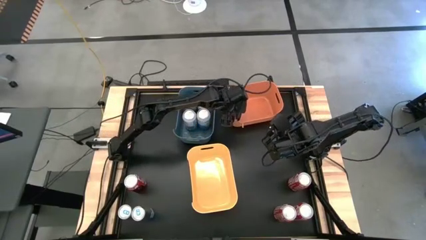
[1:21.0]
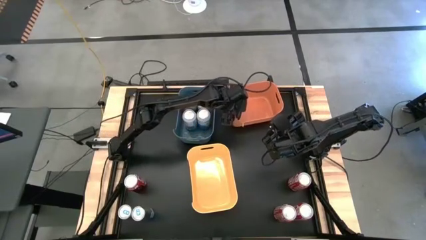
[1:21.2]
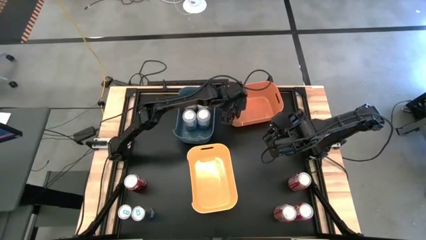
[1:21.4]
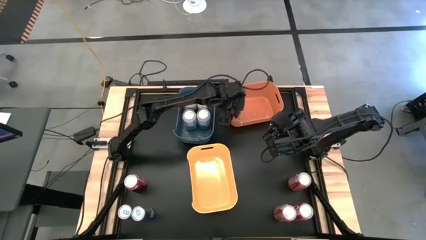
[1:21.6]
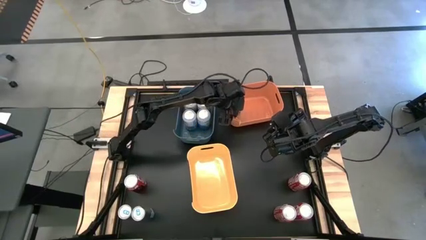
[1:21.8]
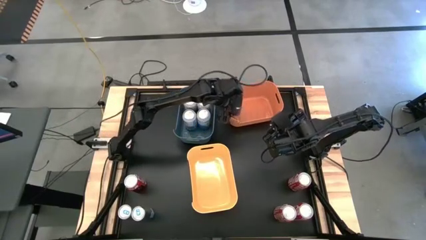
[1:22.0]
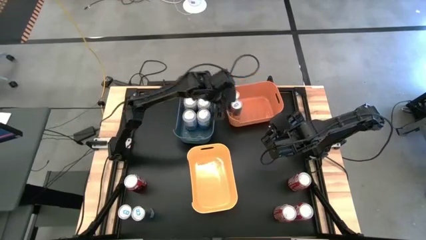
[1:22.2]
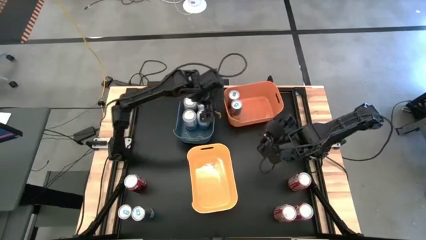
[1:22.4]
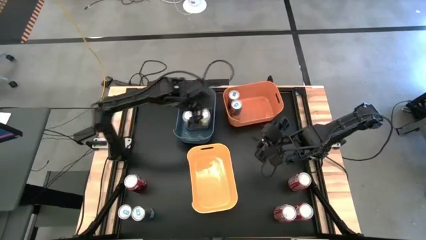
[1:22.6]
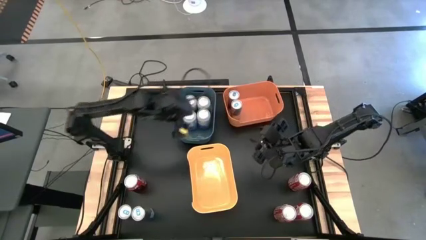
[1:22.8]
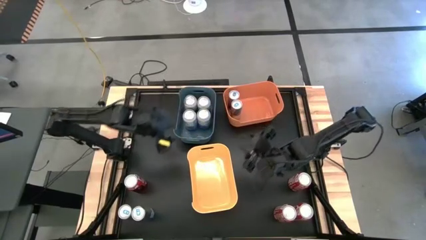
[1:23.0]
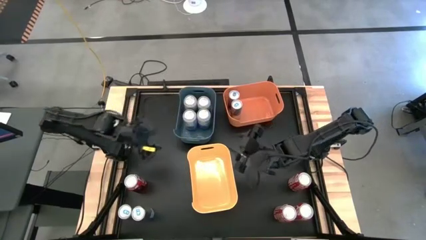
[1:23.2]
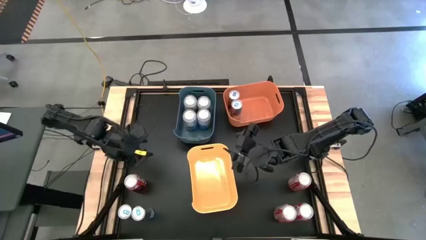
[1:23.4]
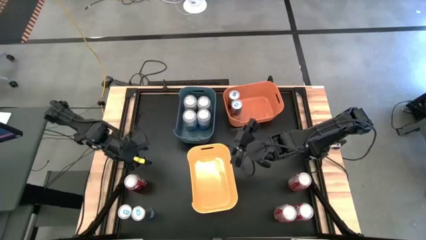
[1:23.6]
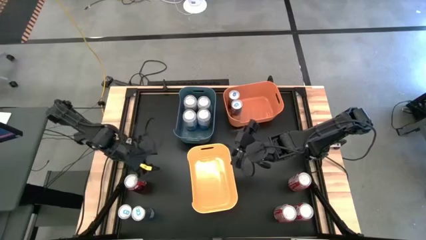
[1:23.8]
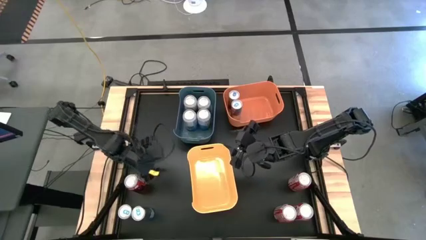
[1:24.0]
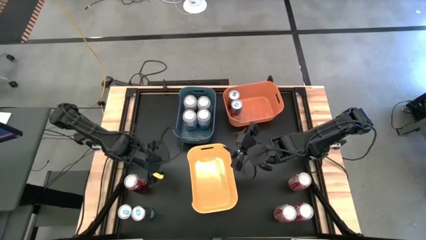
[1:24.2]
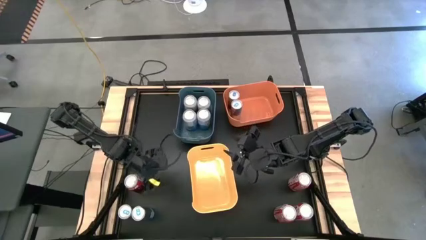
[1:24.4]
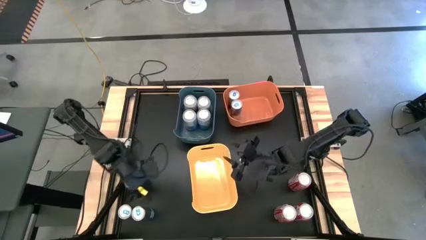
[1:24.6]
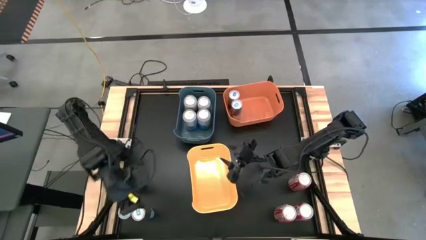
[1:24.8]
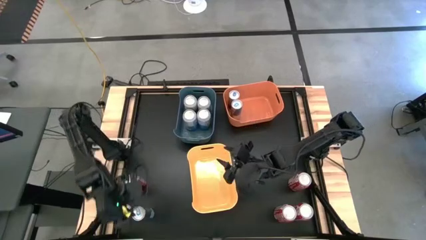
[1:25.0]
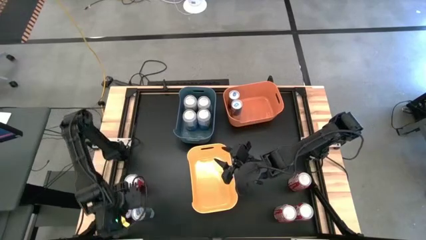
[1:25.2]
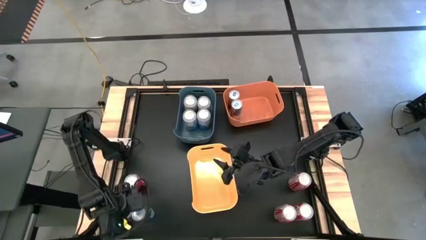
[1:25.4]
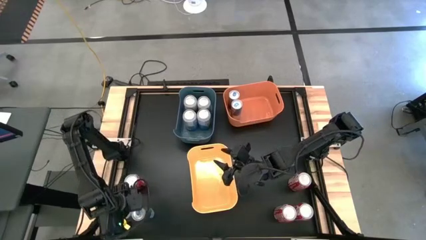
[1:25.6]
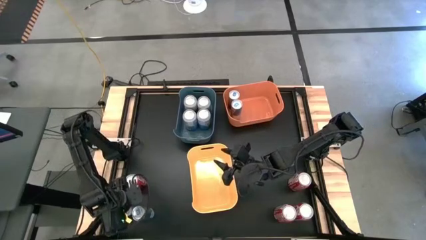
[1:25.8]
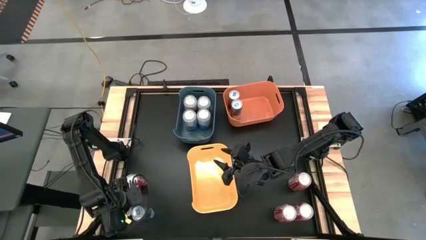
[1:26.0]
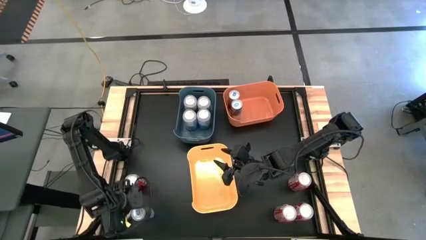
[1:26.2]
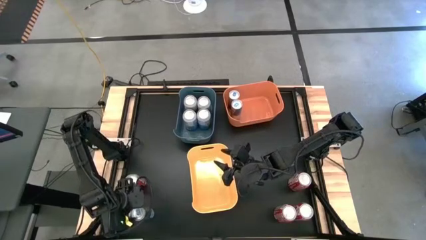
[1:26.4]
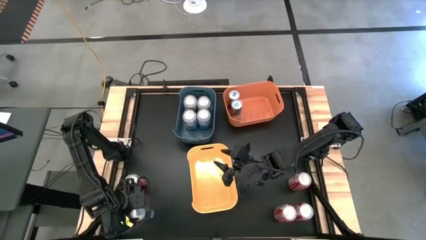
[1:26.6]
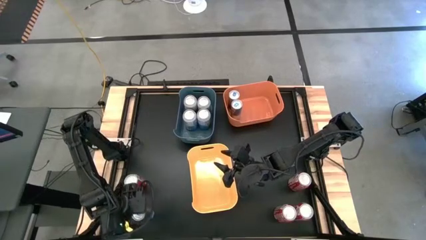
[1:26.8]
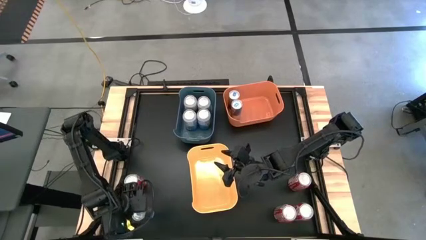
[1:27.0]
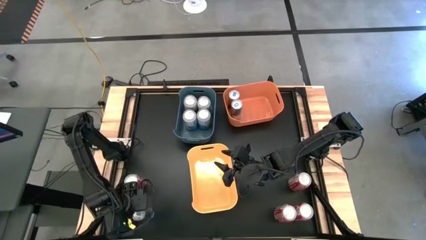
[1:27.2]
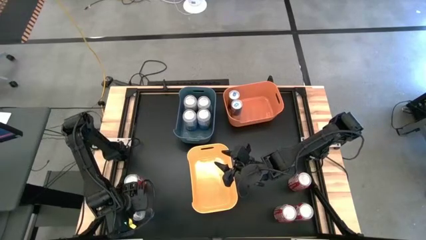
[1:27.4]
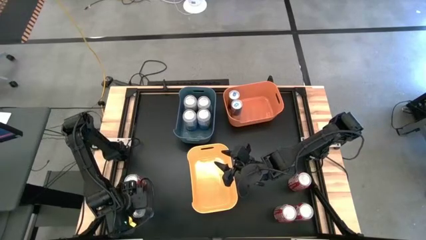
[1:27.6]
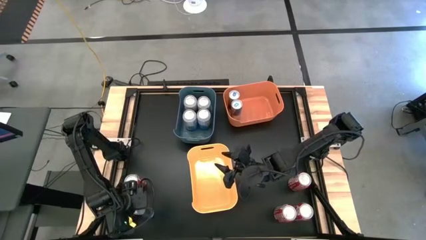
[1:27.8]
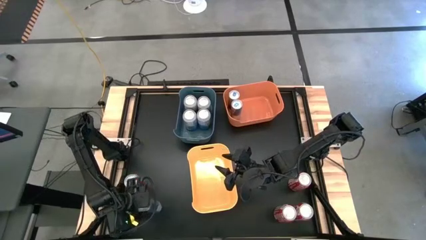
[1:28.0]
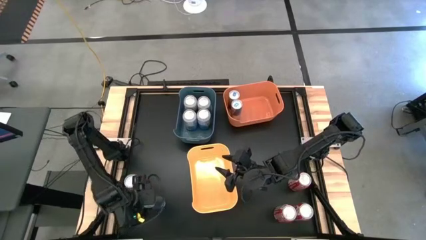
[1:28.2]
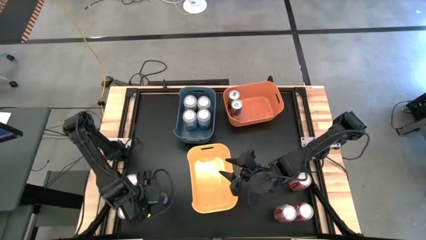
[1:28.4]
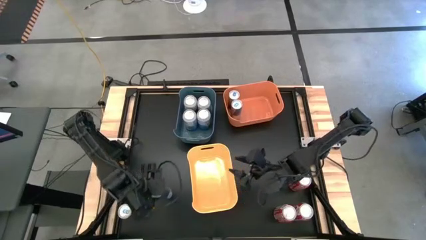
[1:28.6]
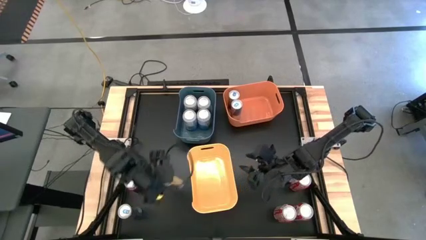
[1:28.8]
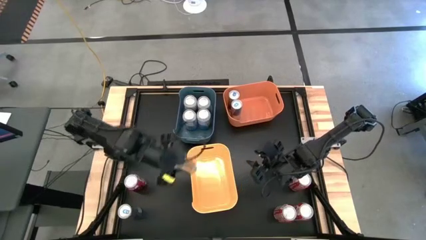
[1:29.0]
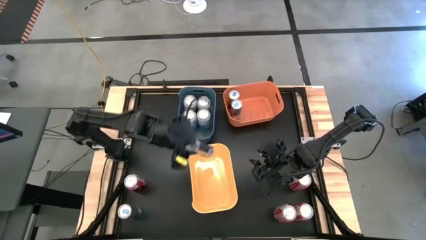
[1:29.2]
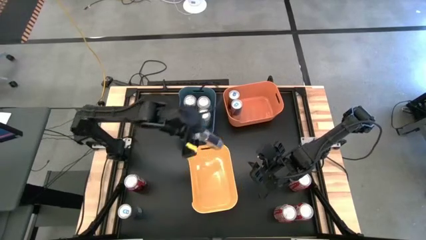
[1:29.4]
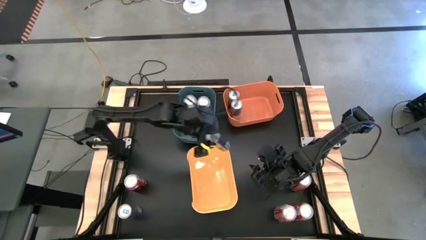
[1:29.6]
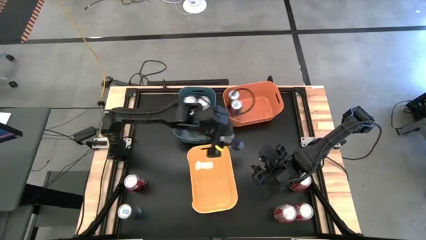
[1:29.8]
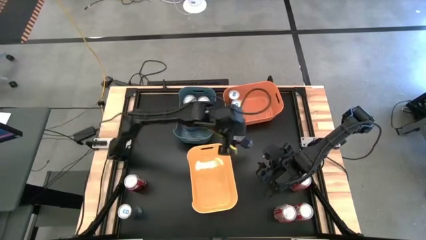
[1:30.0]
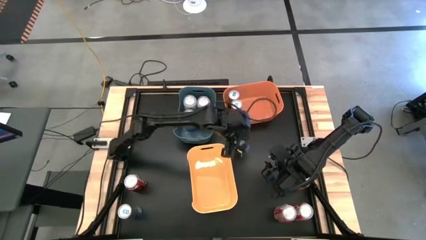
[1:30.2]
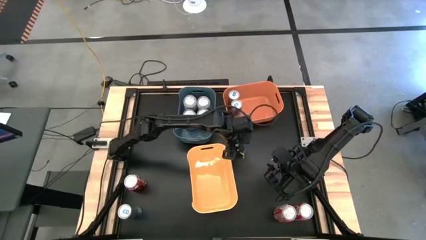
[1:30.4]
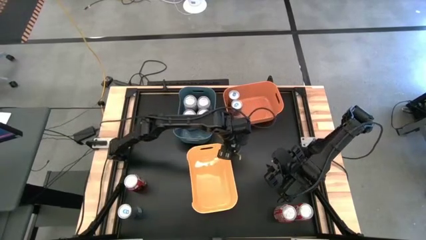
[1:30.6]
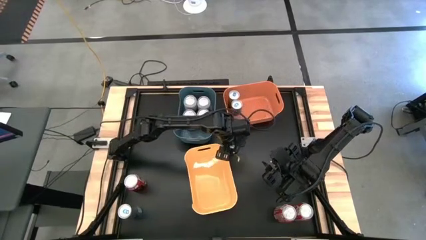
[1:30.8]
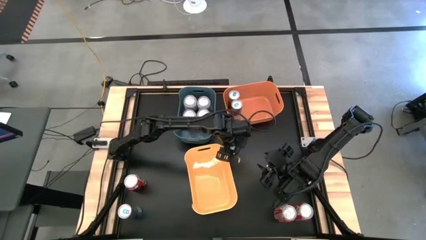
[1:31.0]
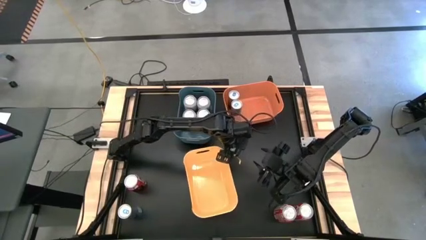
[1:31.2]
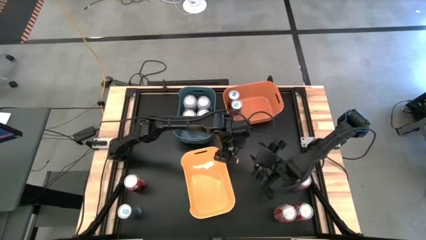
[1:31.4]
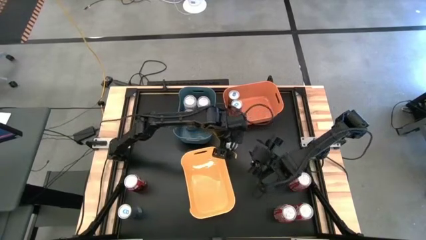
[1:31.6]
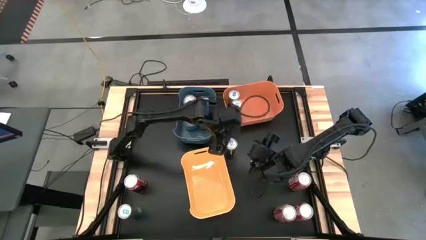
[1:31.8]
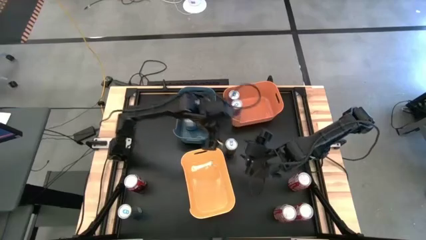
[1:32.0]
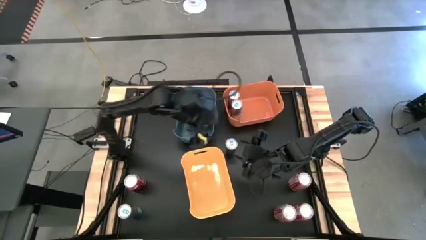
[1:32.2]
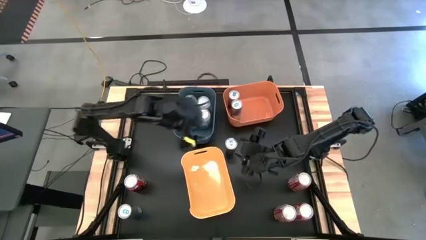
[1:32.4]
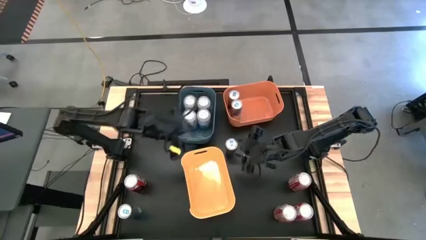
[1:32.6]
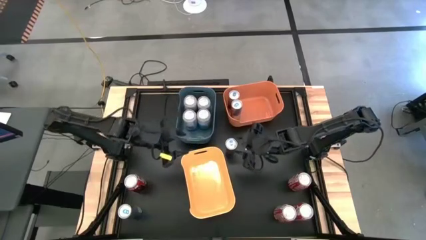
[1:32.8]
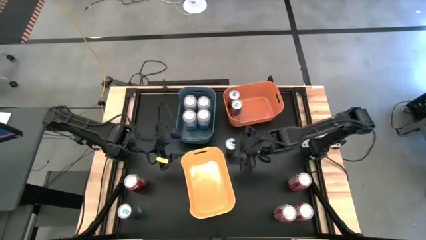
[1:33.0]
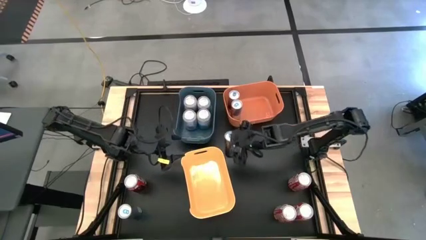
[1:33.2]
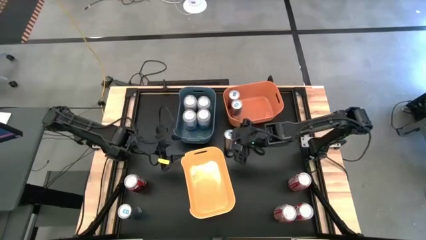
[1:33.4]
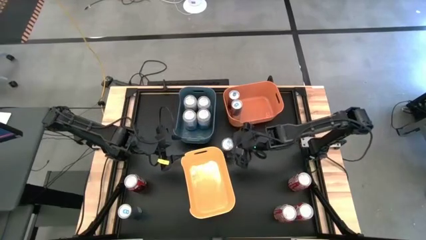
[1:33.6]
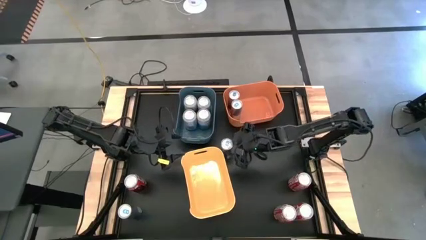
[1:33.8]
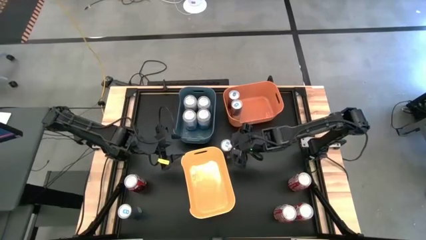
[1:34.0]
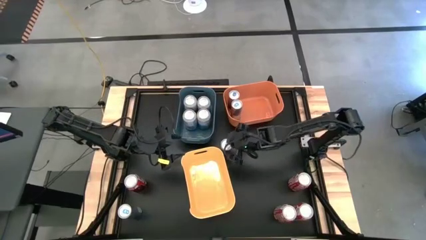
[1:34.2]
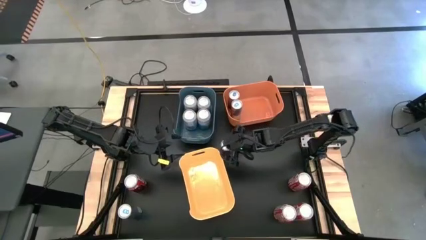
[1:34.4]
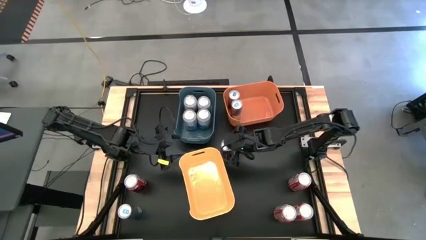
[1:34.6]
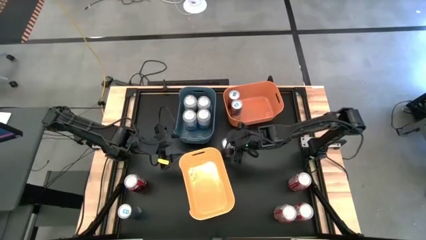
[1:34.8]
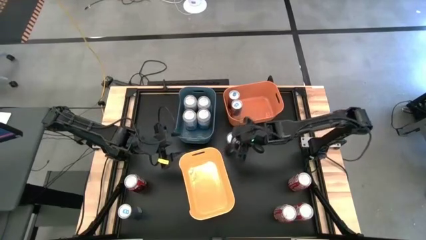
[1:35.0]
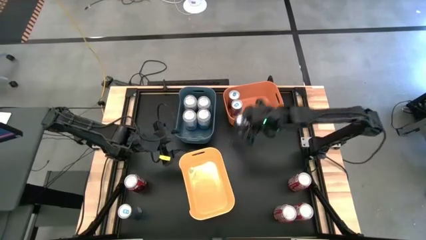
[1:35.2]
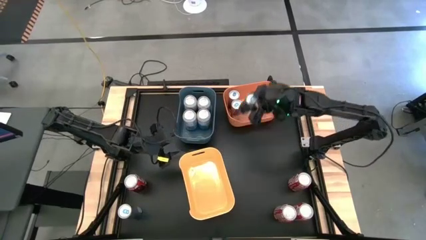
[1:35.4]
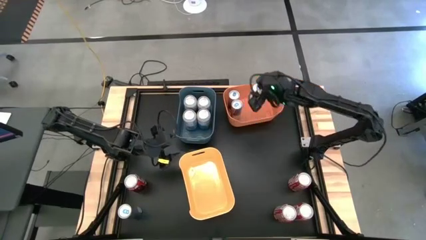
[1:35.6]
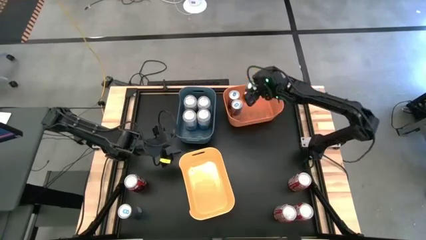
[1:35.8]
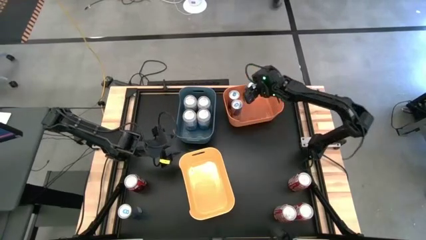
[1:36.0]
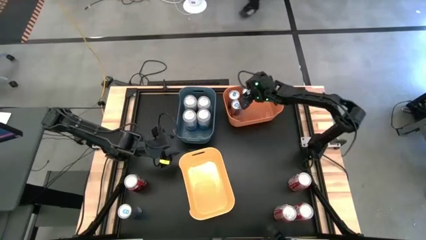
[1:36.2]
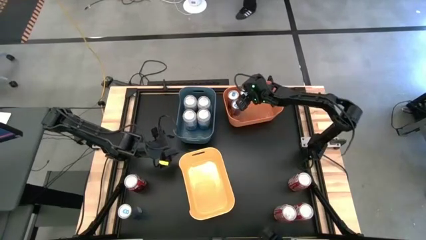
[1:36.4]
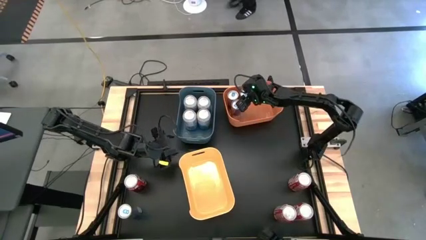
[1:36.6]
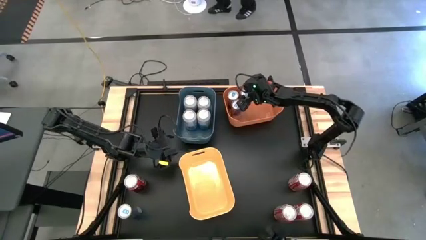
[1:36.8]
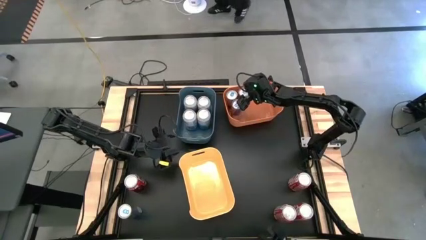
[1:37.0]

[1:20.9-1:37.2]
Task: Sort soda cans
Put the left blue soda can into the orange bin
